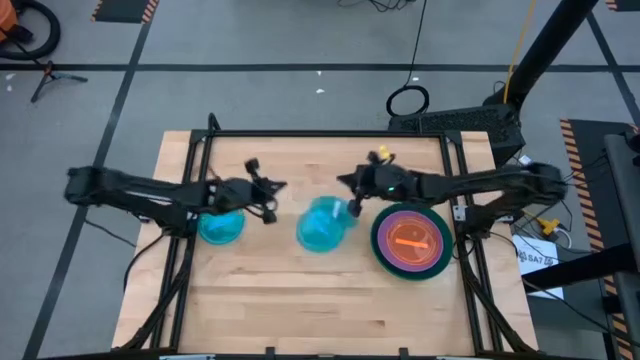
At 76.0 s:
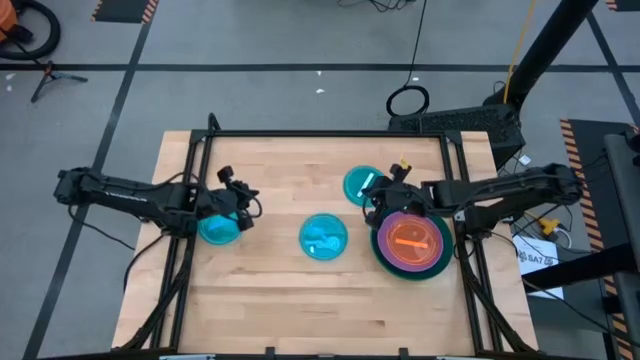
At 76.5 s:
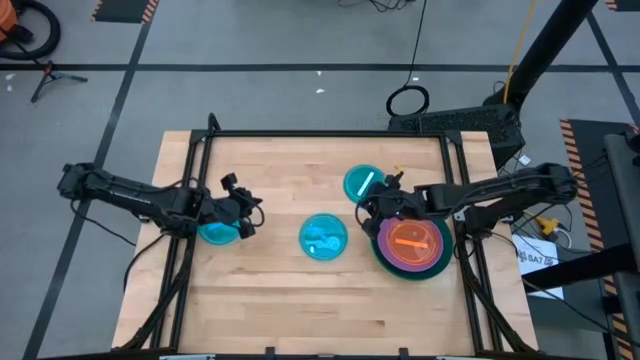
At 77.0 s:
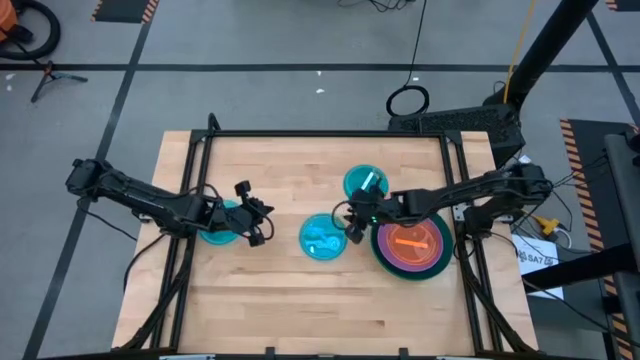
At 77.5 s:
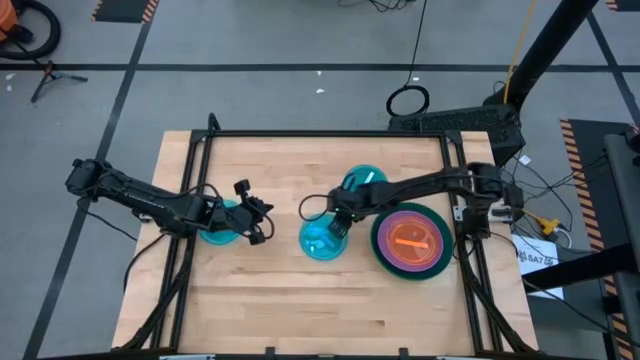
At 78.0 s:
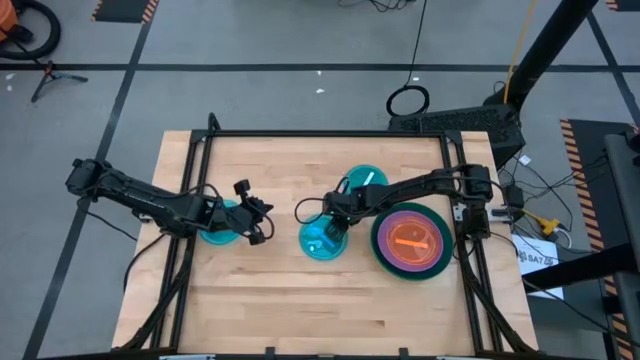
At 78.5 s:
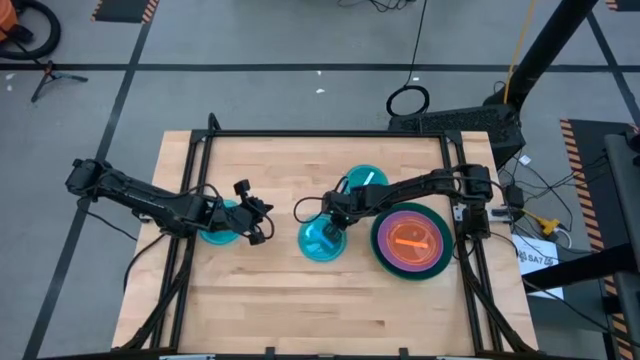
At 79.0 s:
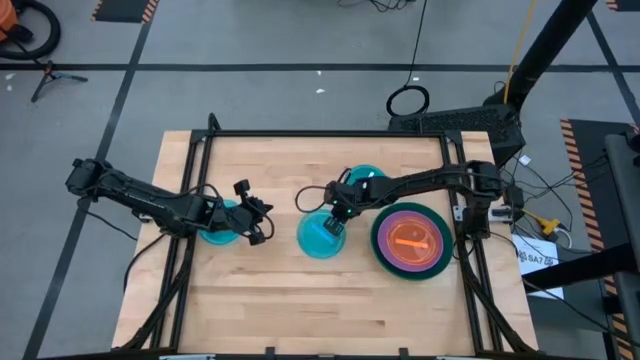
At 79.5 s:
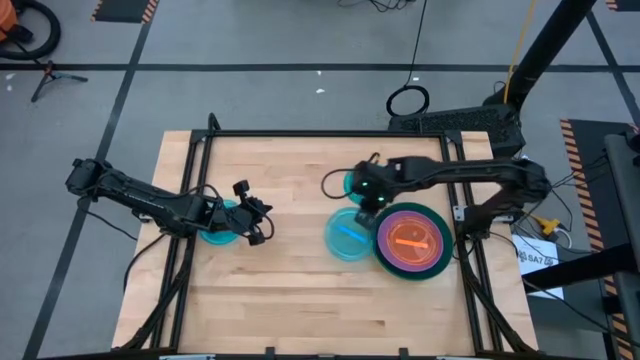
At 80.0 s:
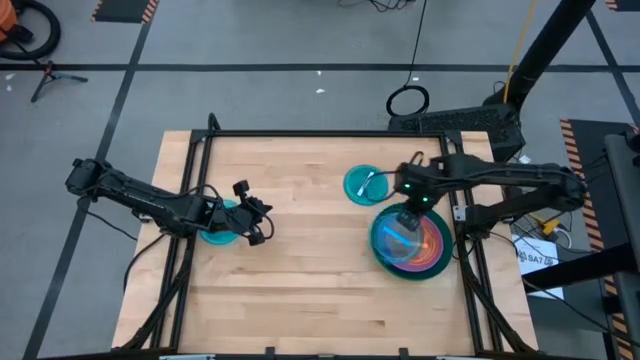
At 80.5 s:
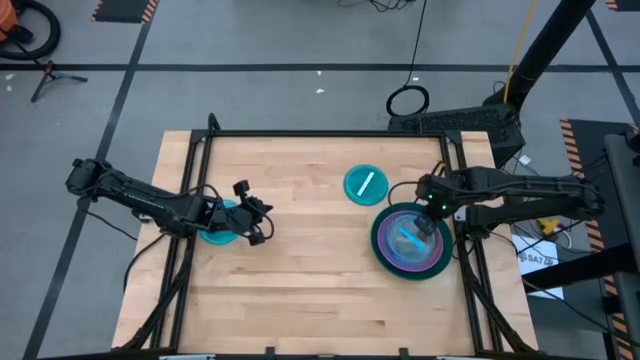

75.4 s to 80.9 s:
Task: Stack plastic plates
Stack the middle blue plate on top of the orange plate

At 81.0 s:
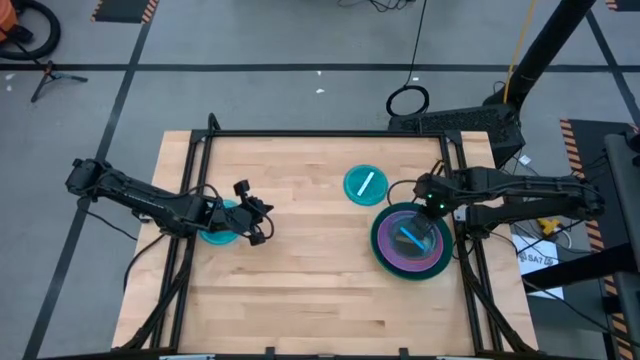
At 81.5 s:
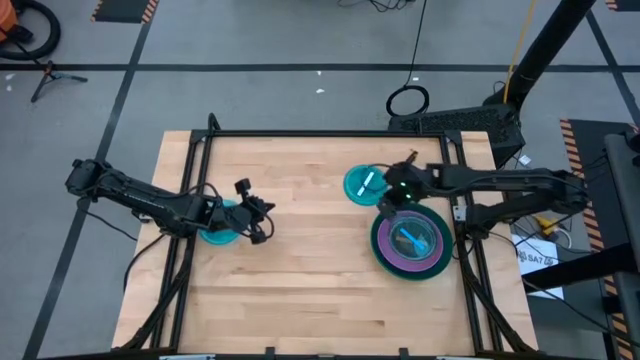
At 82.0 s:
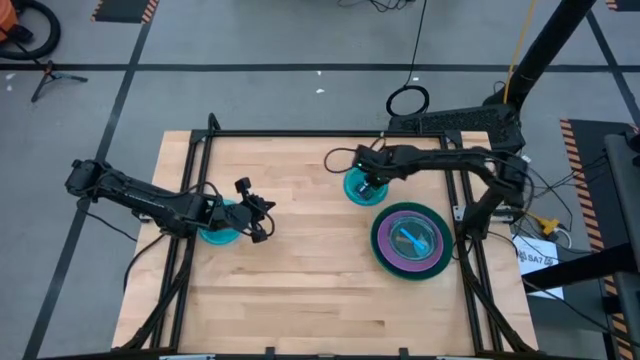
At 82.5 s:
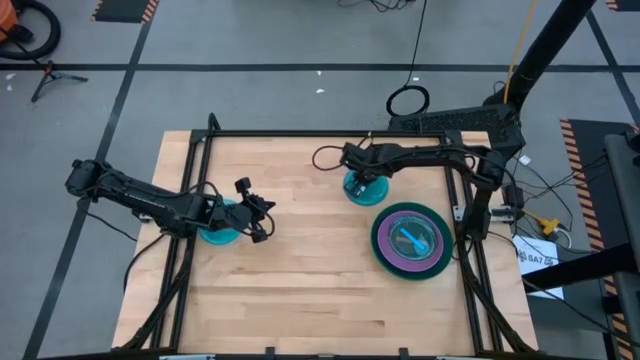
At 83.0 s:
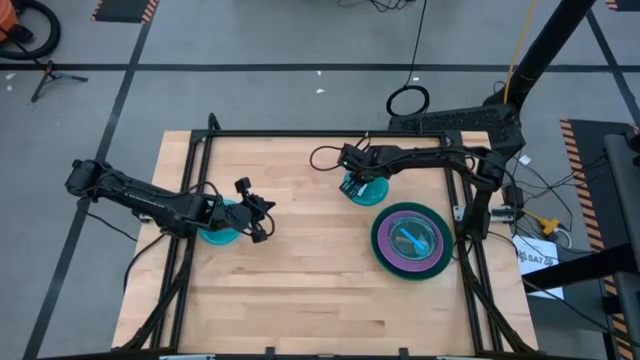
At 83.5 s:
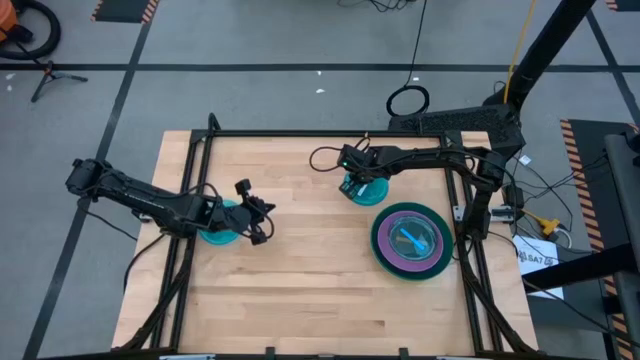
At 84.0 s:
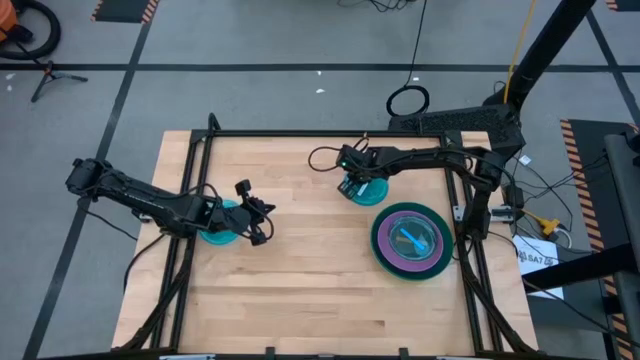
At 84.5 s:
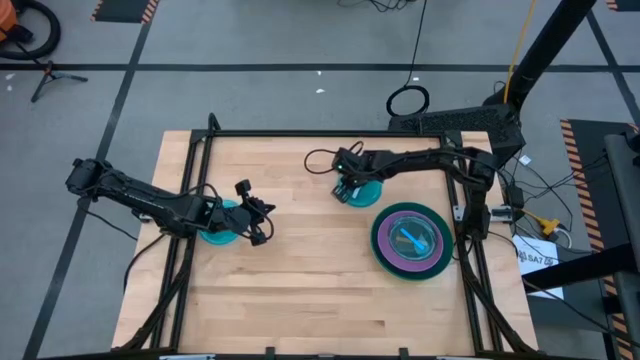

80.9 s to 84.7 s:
Stack the right blue plate on top of the other blue plate

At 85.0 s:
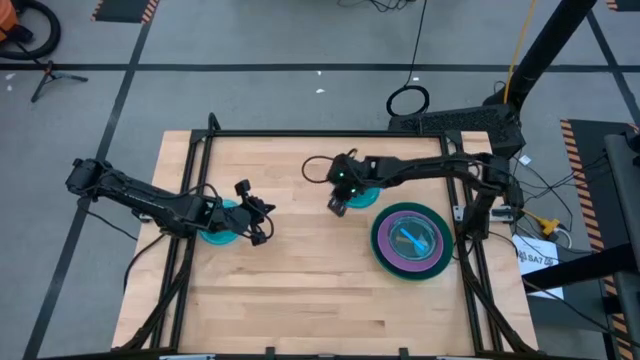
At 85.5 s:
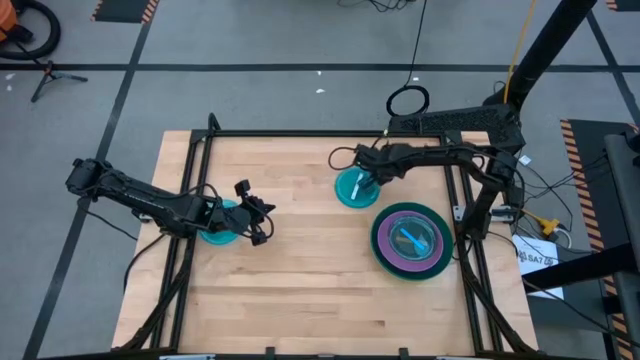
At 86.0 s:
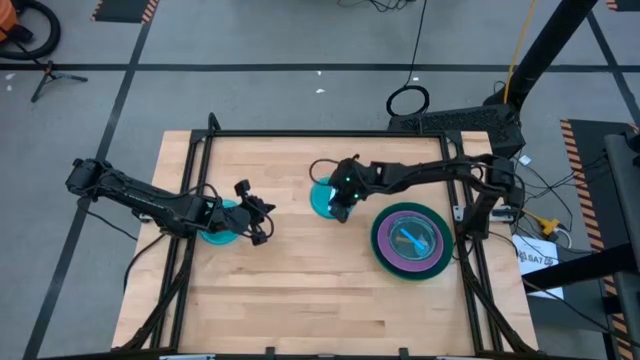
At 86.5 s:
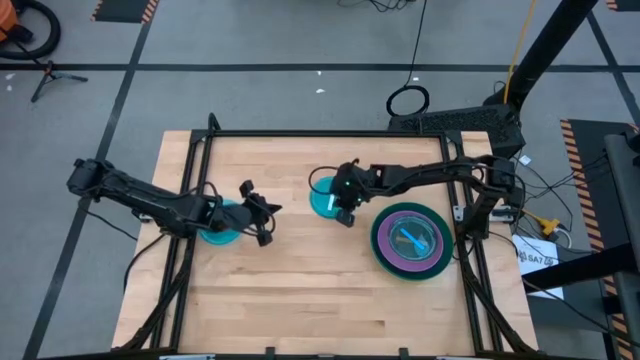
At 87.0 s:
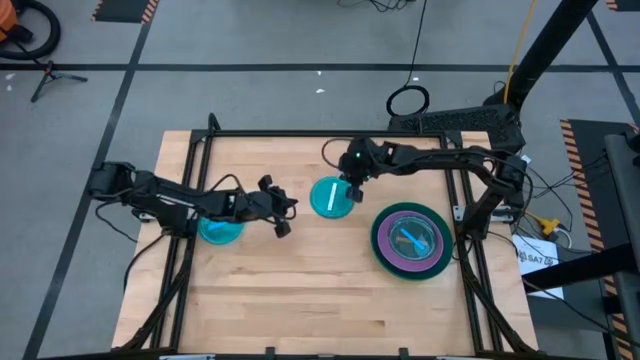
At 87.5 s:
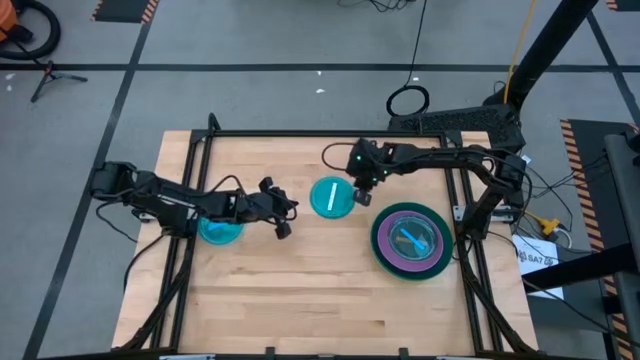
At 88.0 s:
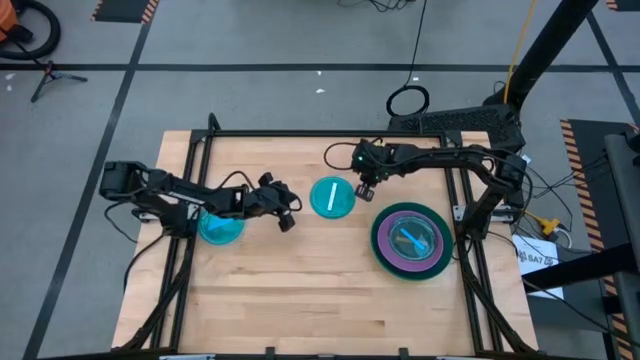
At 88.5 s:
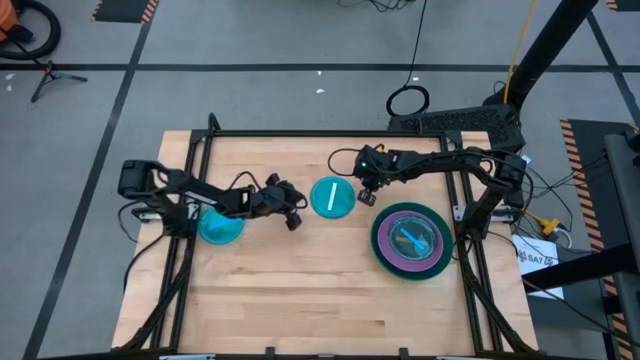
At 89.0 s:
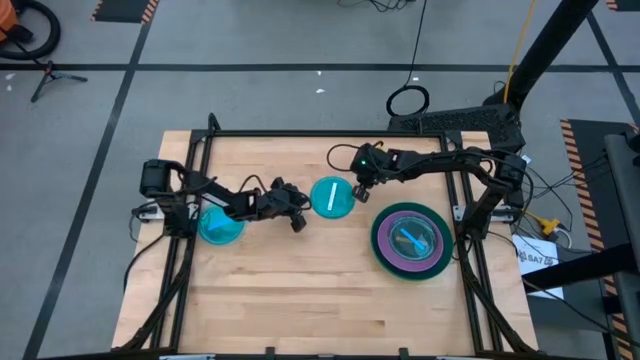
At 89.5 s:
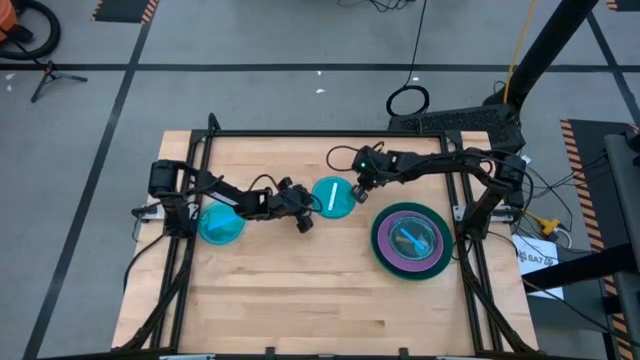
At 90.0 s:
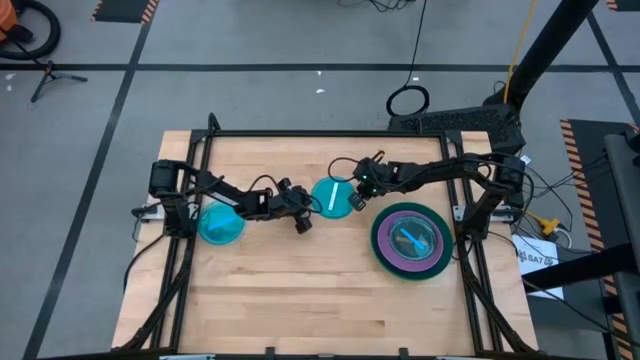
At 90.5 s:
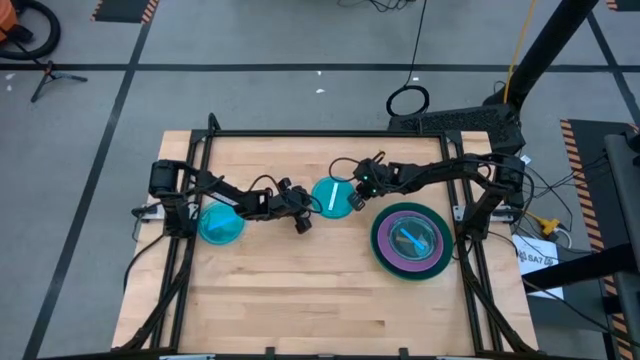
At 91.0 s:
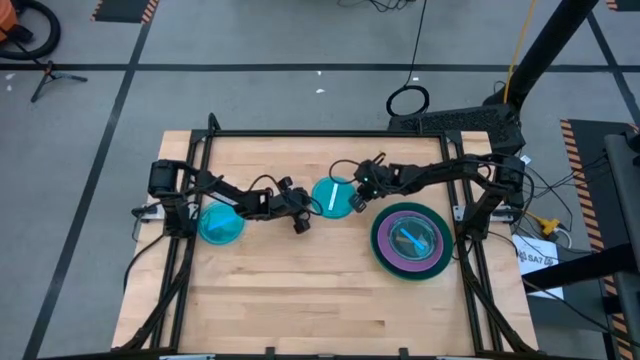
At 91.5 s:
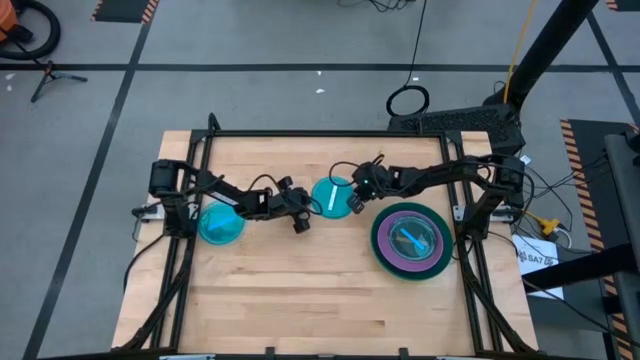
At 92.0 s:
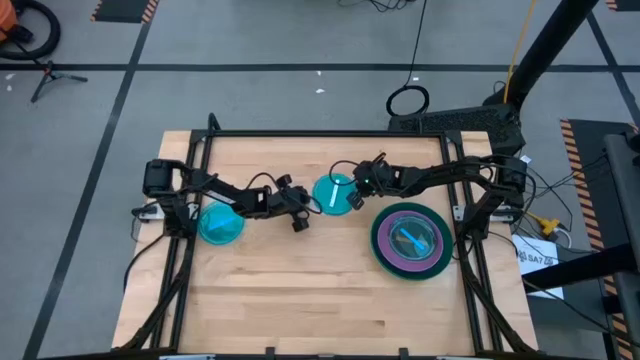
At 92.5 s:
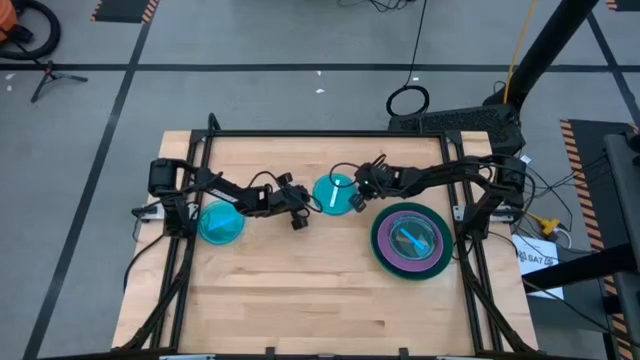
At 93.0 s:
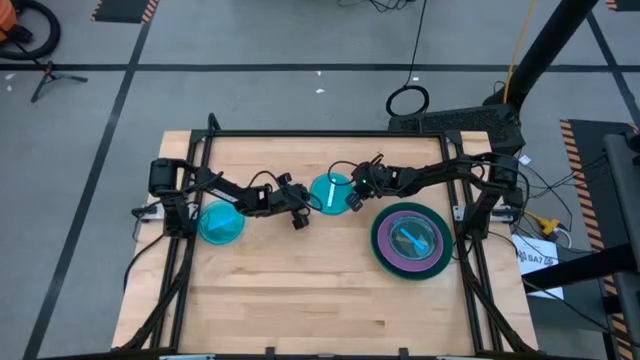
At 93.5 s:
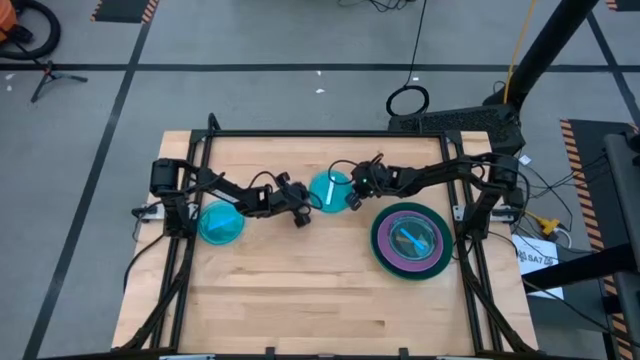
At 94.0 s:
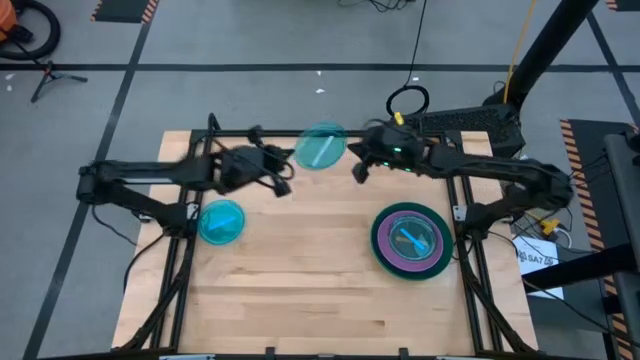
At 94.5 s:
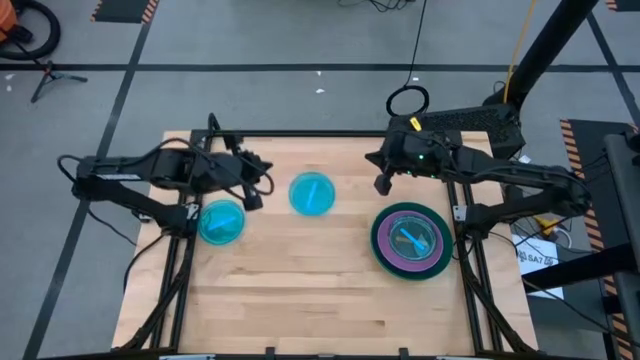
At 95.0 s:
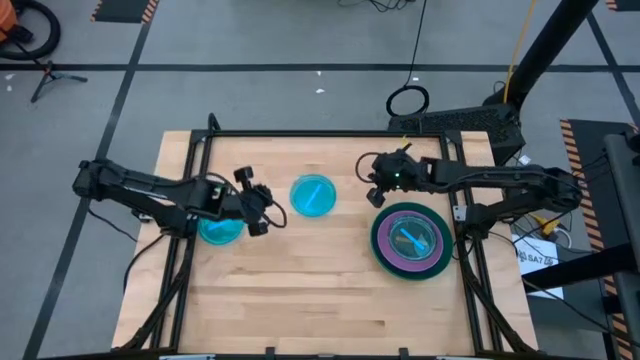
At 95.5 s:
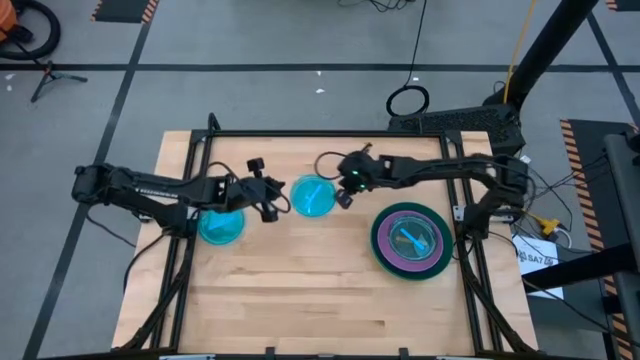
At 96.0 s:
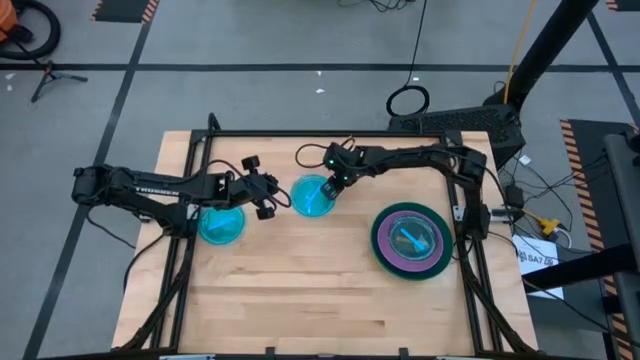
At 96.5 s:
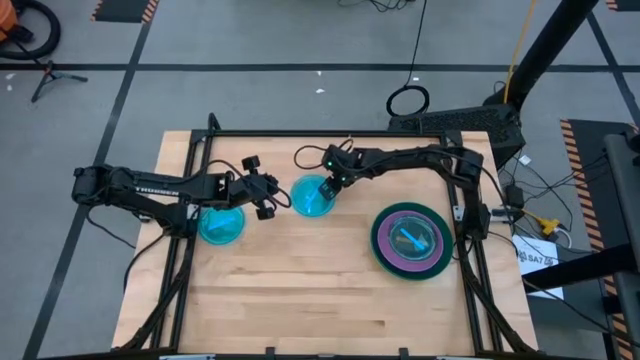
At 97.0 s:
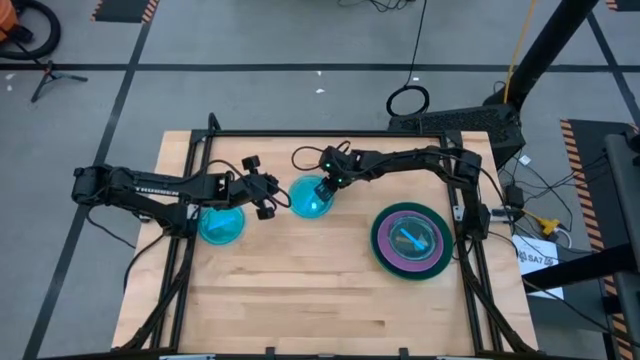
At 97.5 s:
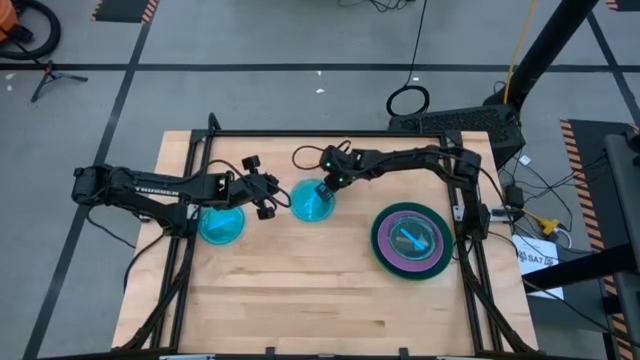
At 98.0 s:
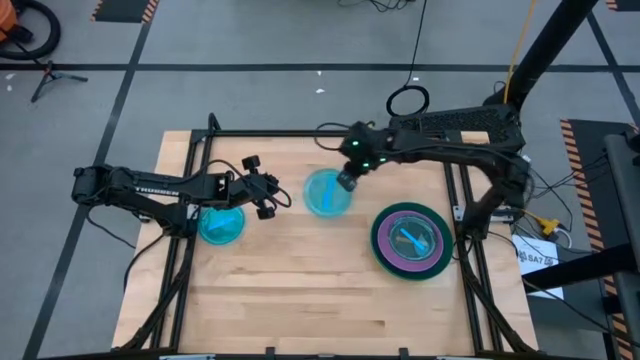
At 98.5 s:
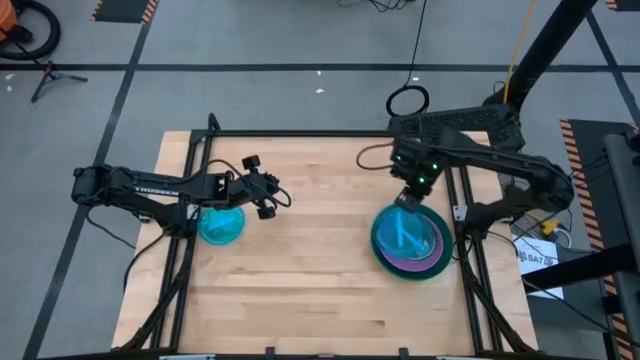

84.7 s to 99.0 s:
Stack the right blue plate on top of the other blue plate
